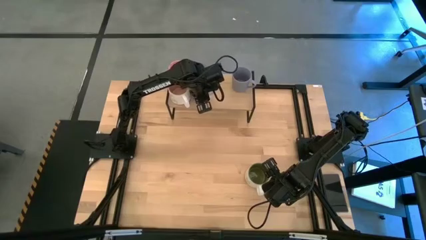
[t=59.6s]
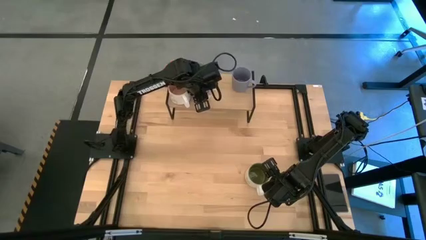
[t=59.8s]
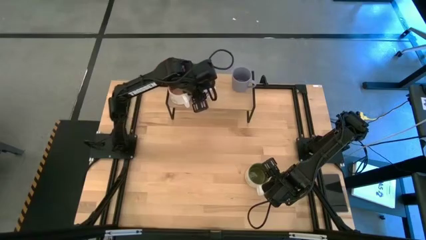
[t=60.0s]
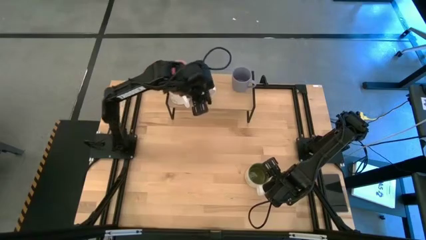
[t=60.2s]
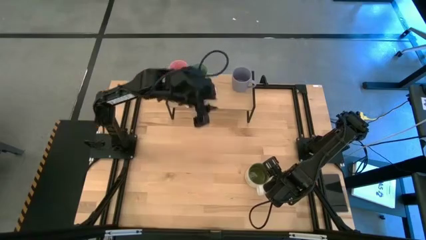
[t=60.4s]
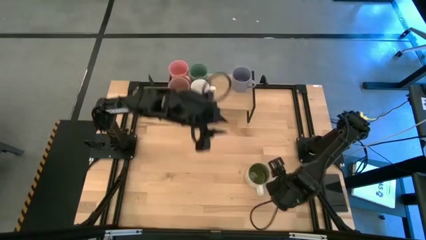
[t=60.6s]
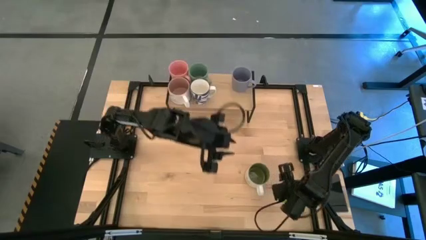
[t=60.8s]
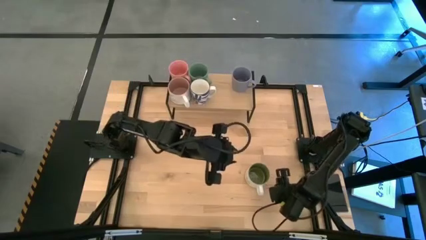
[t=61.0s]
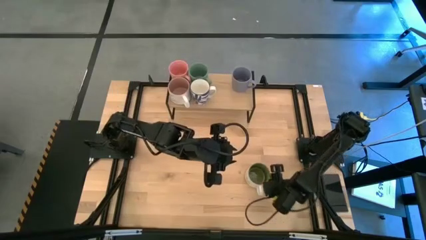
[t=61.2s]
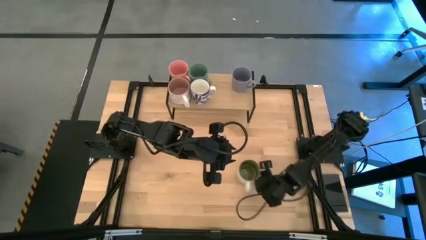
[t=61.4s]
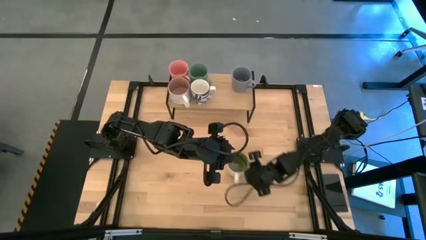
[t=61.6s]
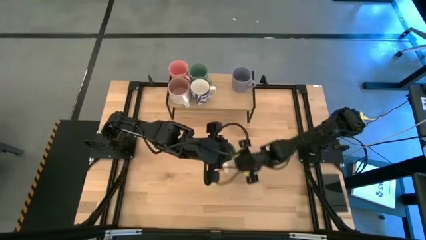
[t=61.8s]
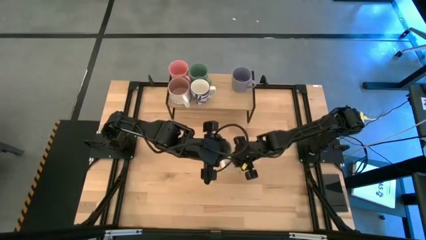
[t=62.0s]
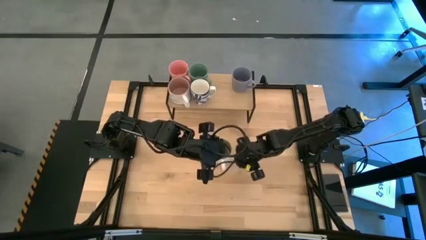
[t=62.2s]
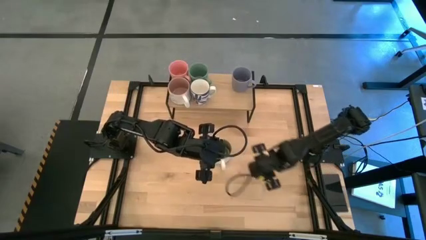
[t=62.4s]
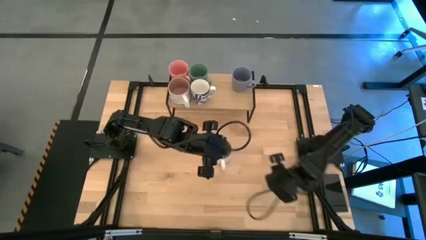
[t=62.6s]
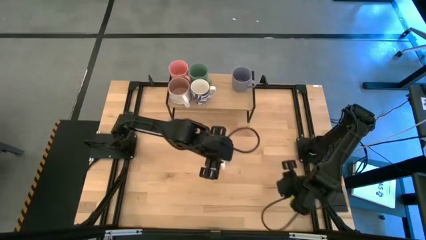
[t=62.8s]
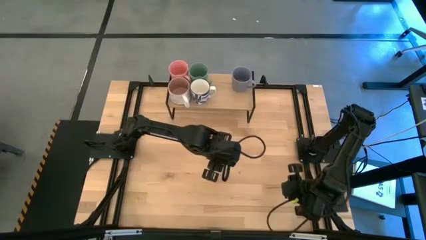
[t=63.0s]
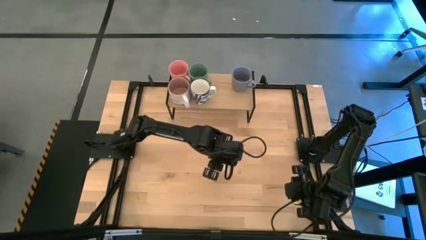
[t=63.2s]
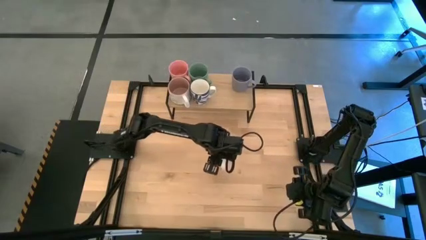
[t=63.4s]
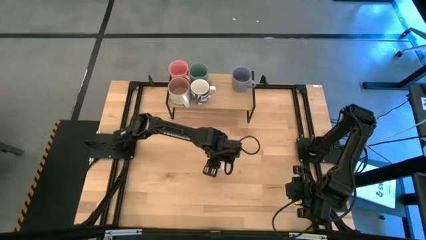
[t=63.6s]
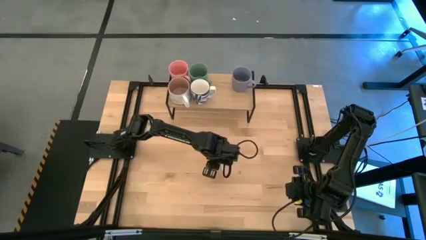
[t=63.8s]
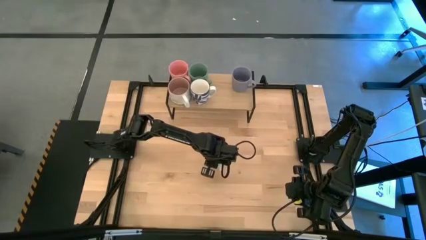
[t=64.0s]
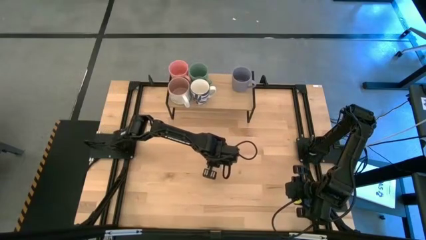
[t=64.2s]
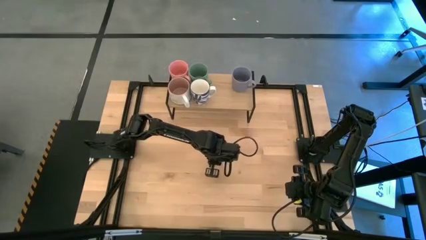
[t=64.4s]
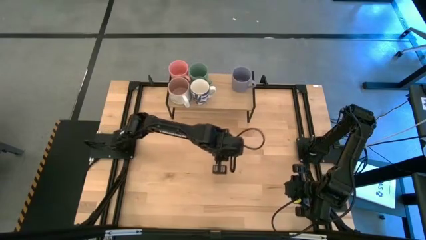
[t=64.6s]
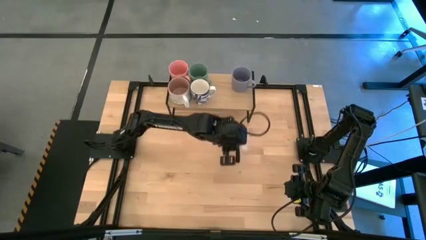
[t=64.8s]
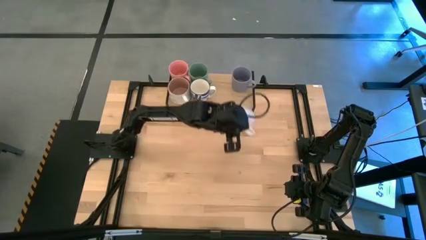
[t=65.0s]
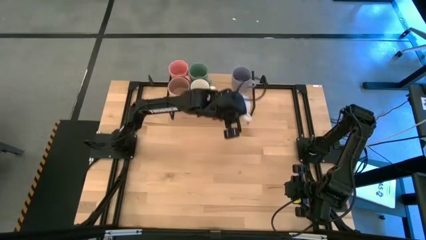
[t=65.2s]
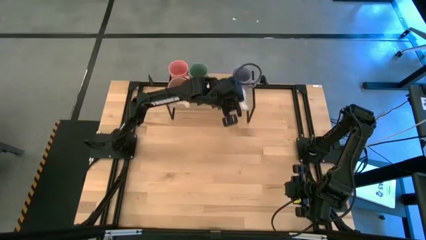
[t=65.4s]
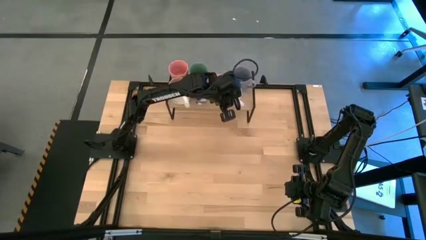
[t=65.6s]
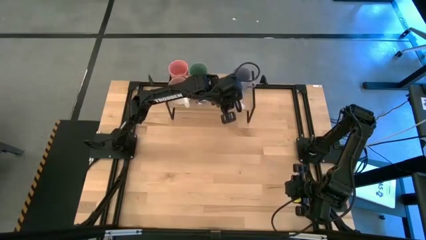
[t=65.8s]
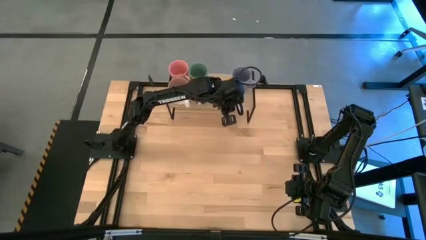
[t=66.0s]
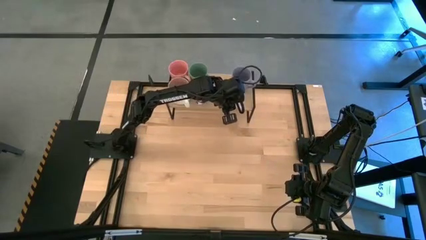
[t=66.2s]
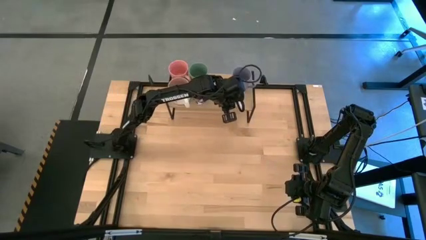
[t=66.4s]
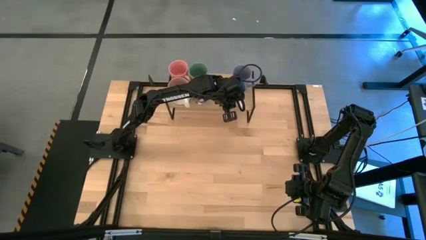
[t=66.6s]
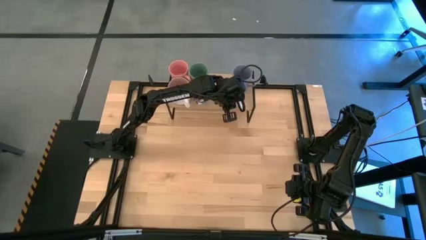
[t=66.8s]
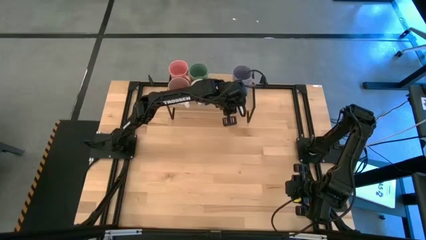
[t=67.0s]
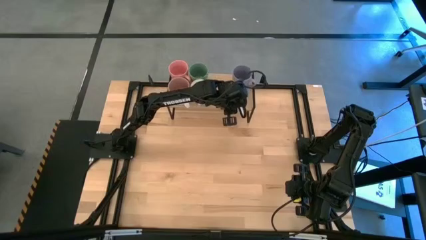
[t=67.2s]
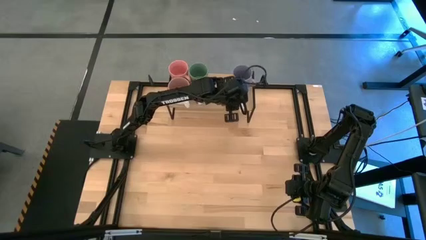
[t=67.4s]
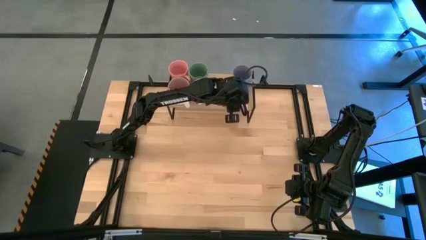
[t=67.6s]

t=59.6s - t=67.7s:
Task: Place coffee mugs
Put the white-green mug on the shelf

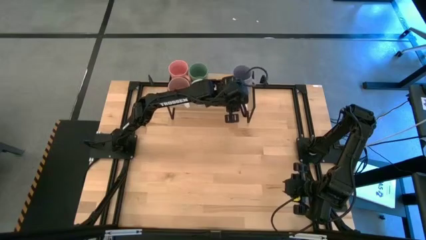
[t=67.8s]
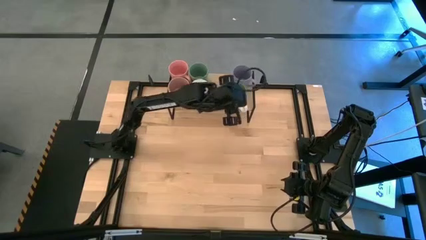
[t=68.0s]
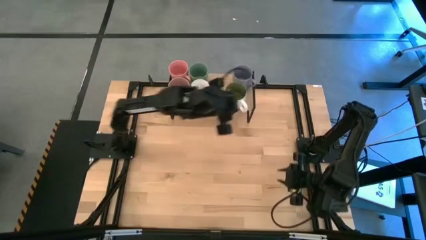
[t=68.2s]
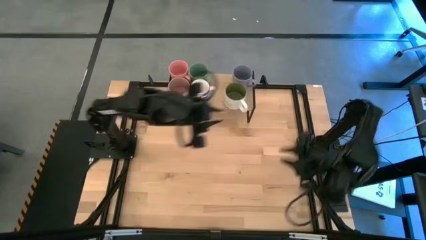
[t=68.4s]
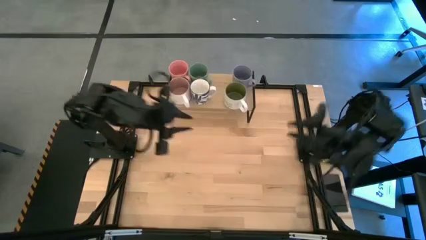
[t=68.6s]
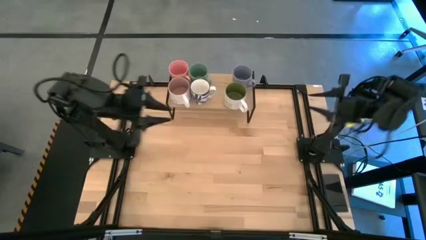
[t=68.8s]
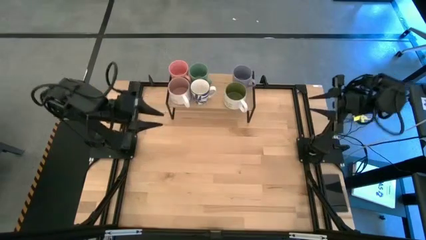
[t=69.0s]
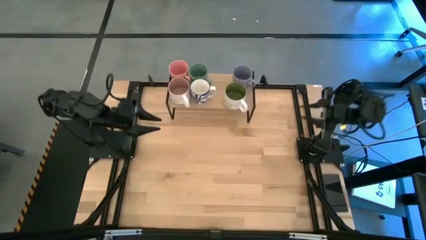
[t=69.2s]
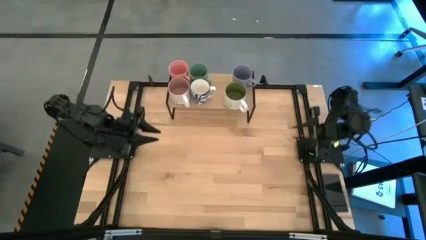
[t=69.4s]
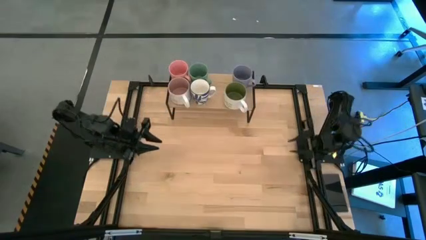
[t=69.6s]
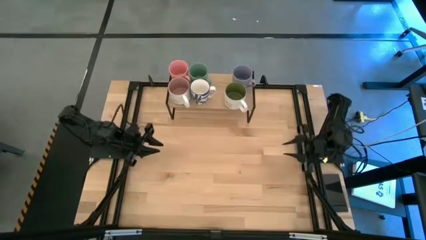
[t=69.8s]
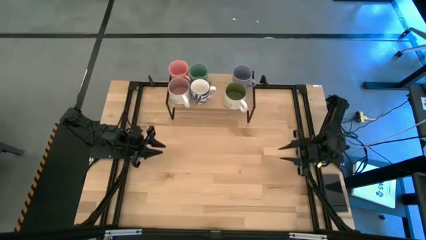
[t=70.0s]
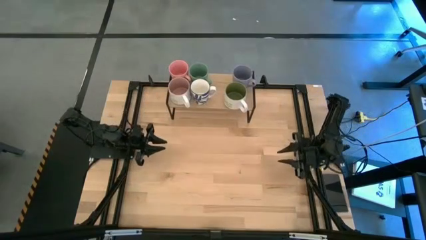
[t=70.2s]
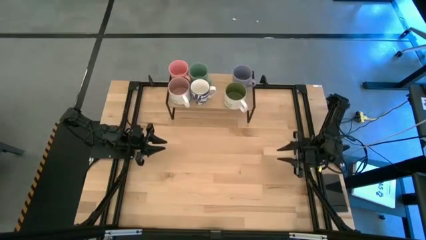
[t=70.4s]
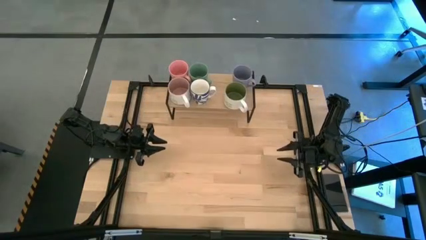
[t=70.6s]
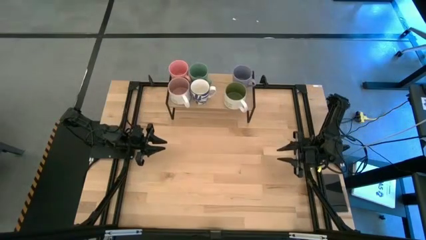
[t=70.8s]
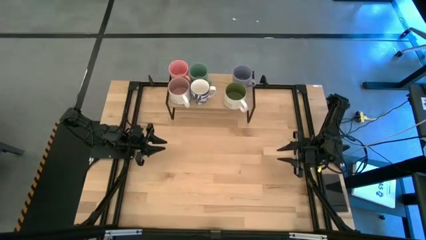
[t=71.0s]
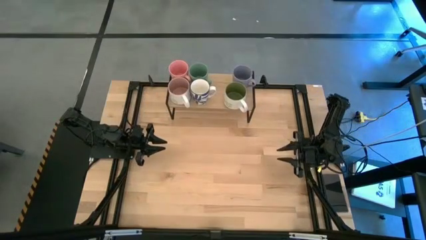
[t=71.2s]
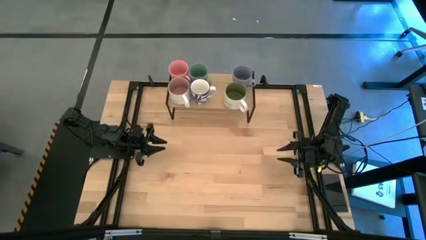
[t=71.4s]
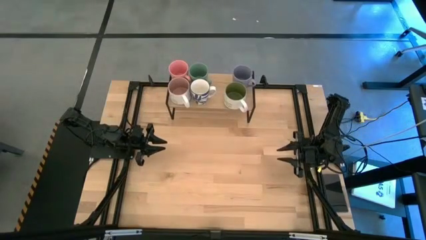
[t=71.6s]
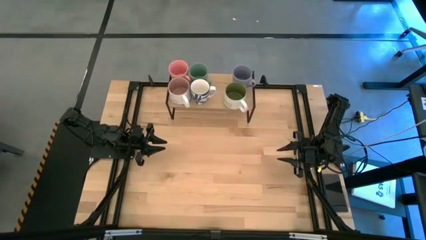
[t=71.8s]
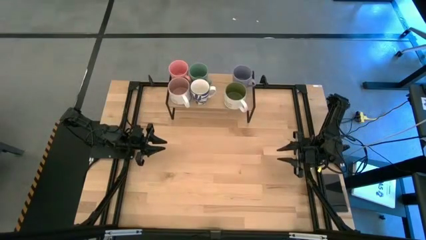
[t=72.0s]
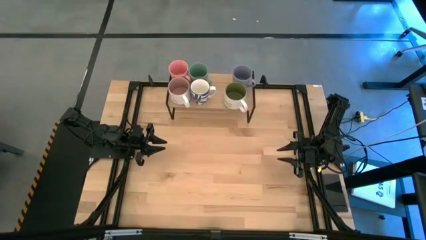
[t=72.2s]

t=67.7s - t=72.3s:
Return to Home Position

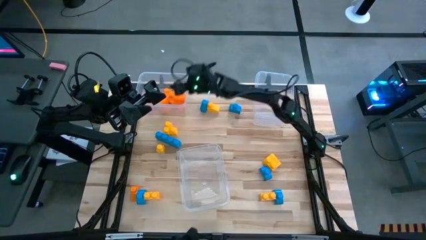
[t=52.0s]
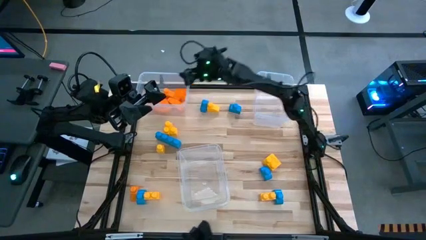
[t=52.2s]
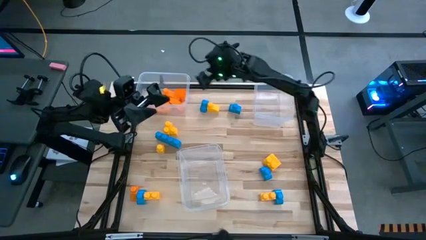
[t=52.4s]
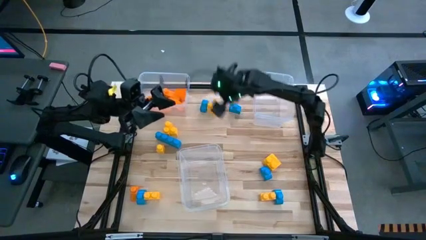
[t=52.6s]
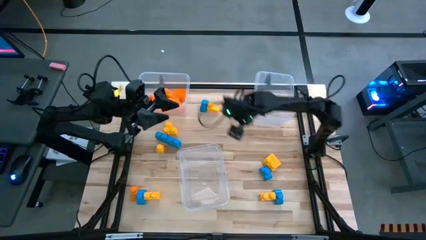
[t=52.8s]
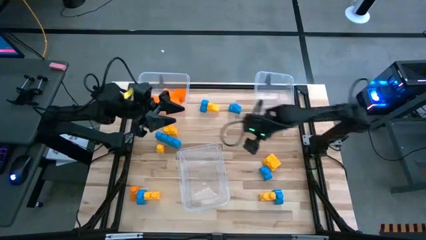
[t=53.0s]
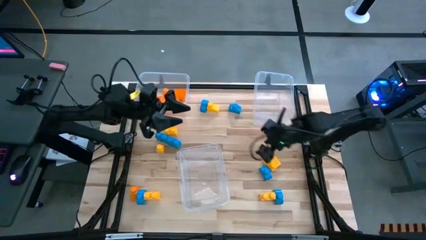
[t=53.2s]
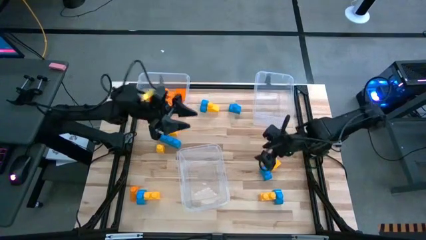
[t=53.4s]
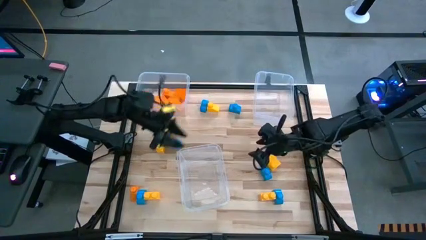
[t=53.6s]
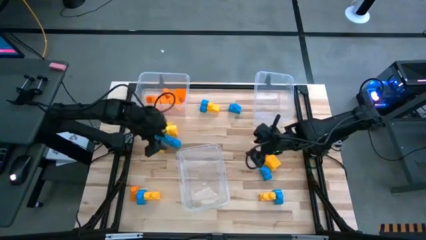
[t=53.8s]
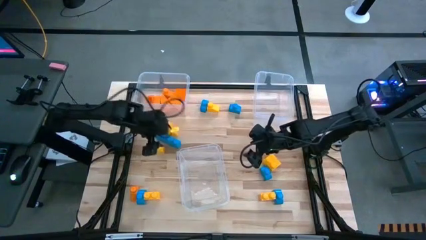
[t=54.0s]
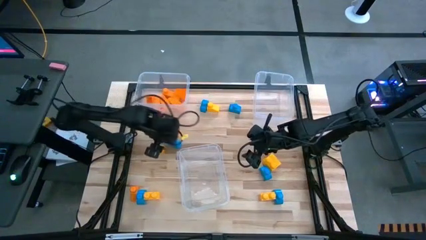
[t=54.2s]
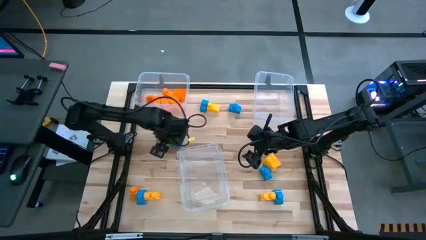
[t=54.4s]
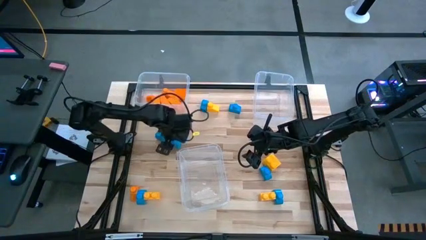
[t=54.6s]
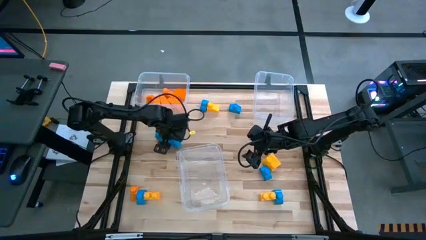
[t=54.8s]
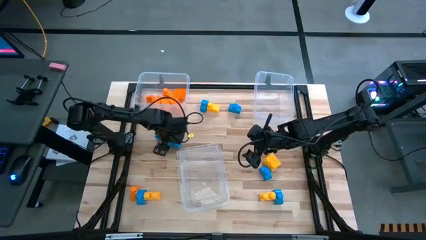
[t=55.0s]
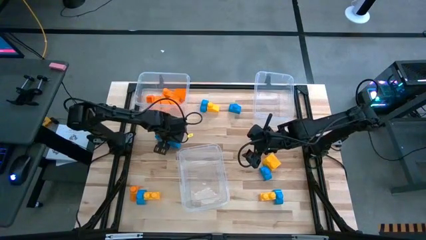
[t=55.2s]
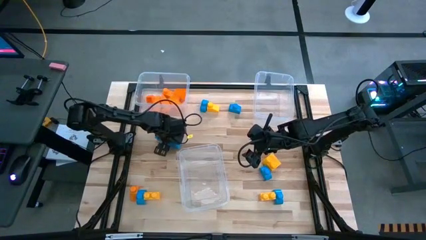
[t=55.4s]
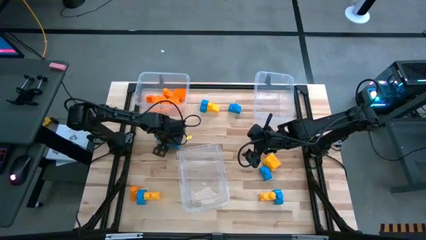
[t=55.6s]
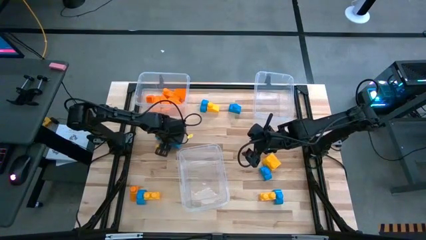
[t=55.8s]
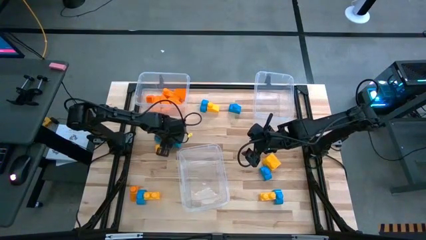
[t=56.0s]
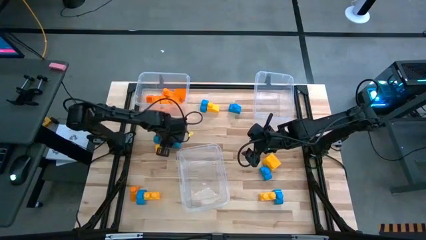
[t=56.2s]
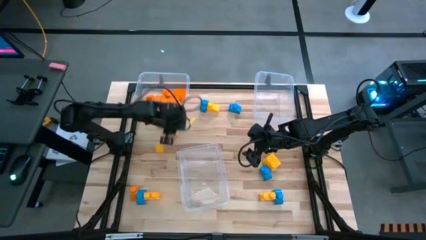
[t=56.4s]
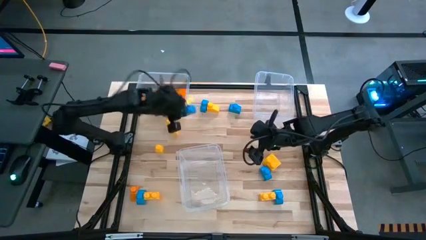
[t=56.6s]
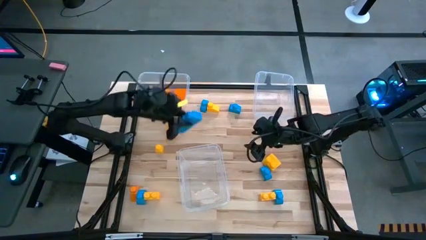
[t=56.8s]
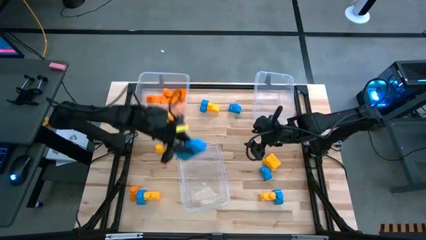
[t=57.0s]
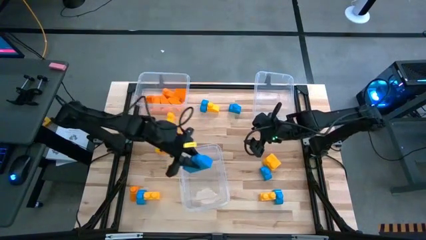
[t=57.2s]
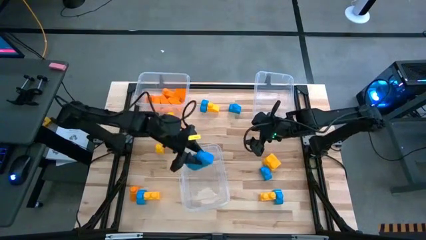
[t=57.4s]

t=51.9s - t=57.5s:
Task: Sort blocks
Put the blue game piece into the bottom transparent bin
